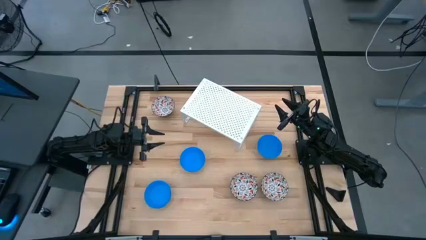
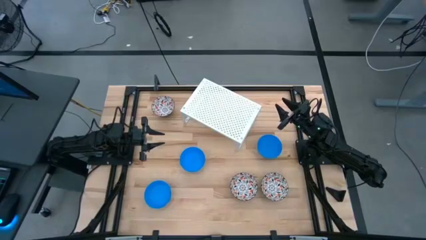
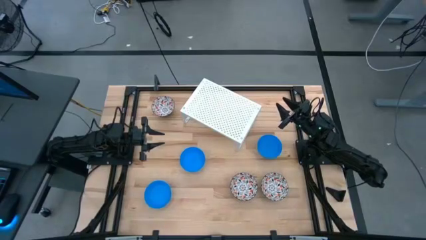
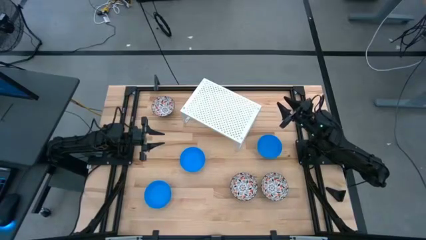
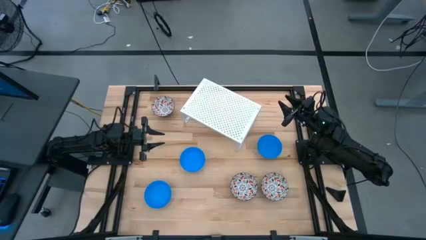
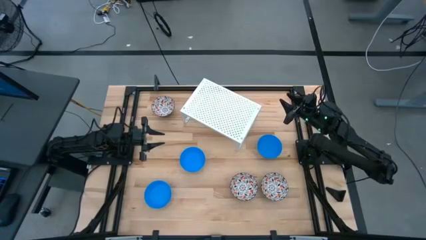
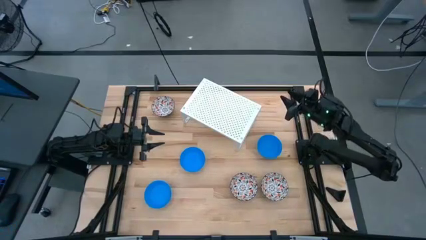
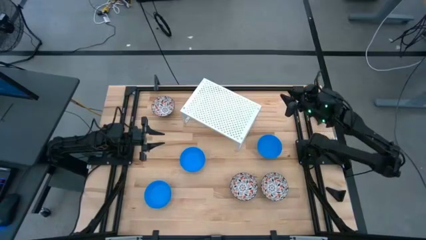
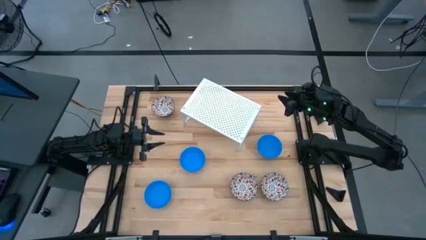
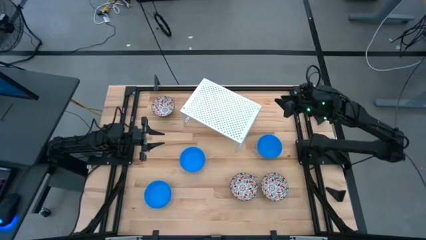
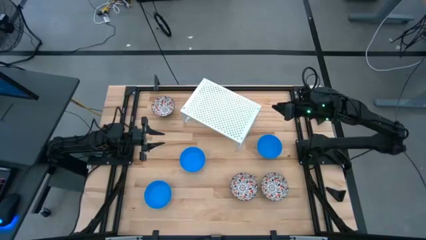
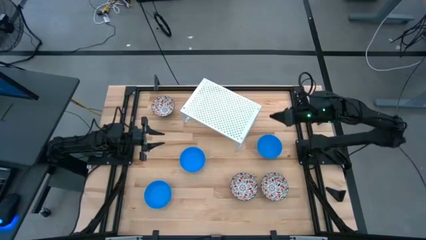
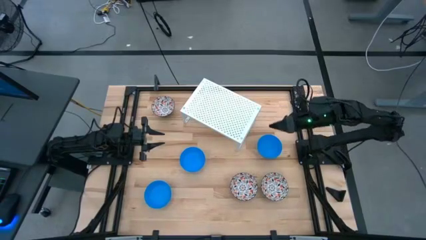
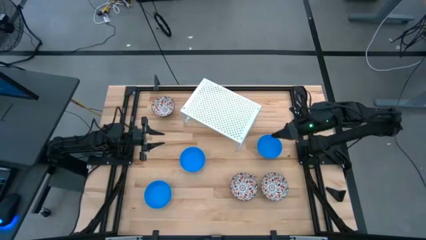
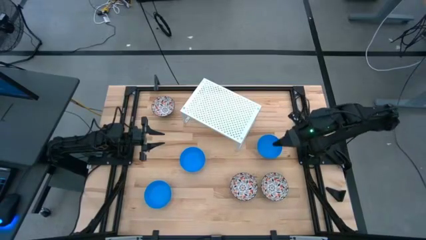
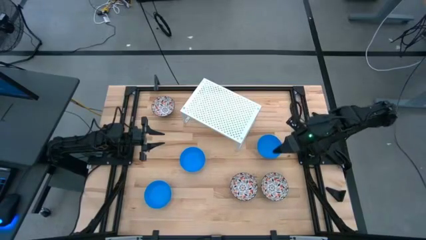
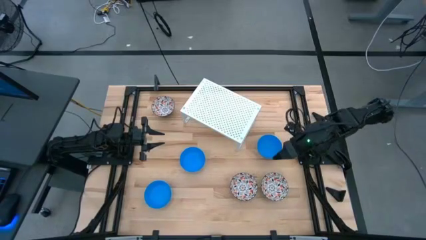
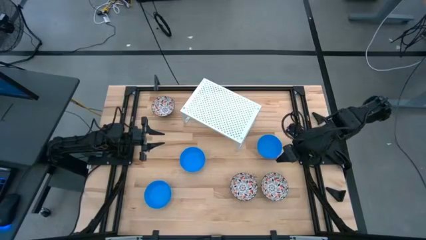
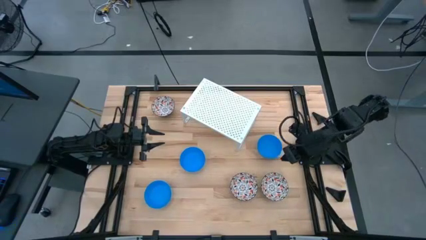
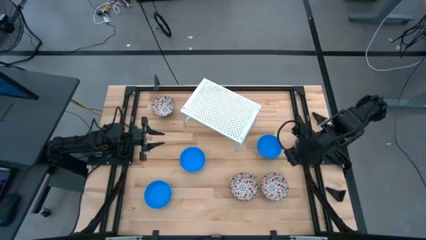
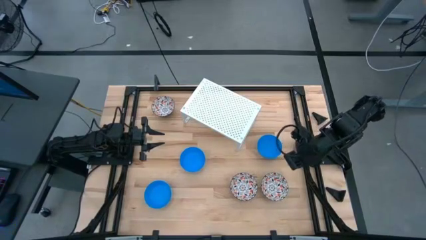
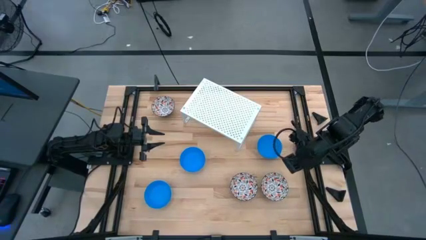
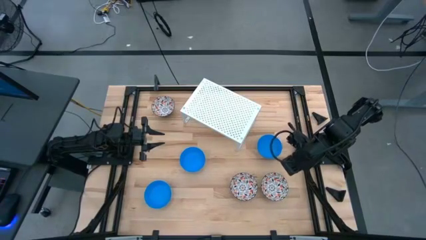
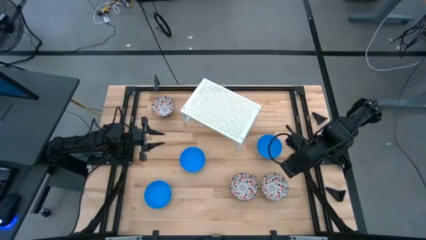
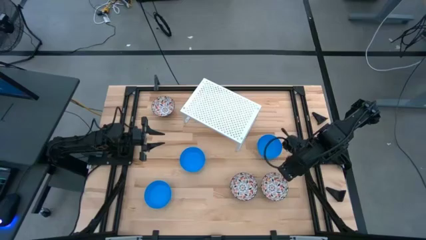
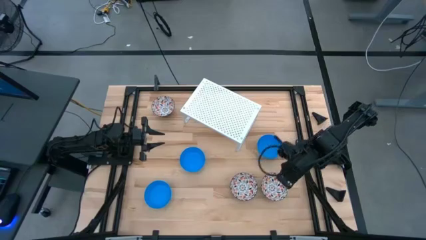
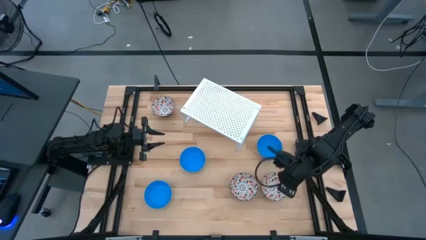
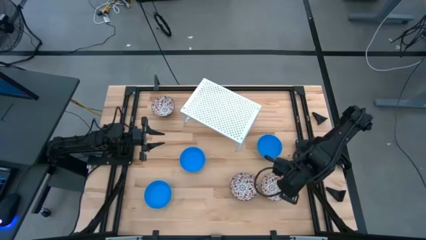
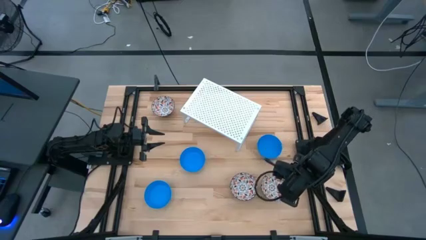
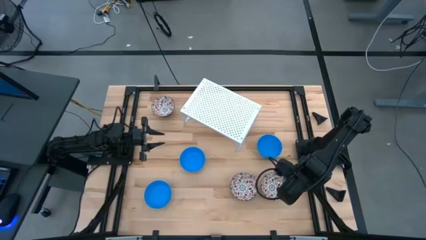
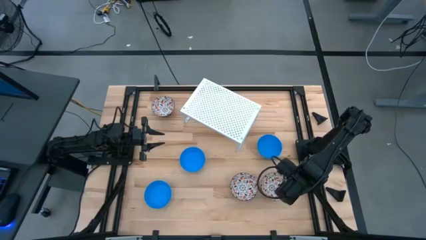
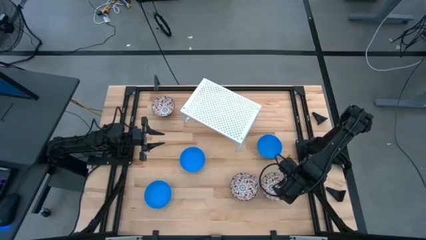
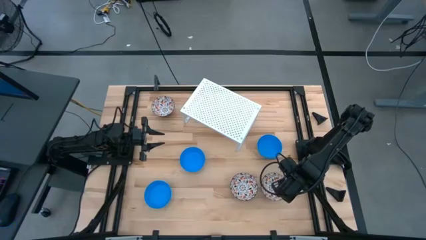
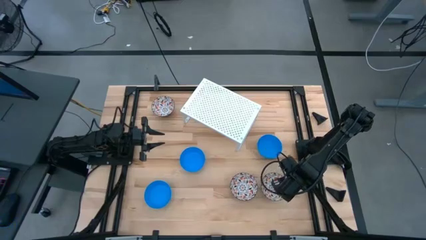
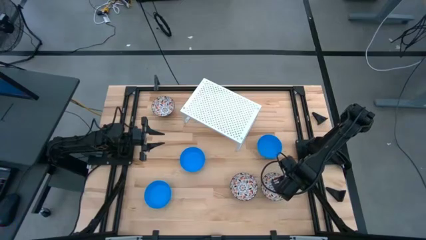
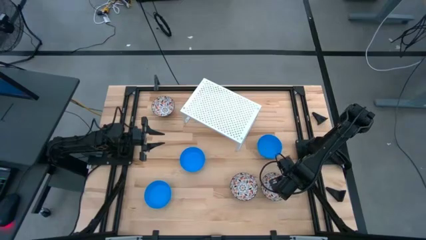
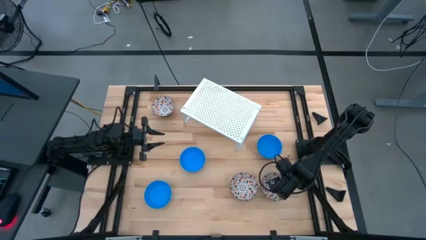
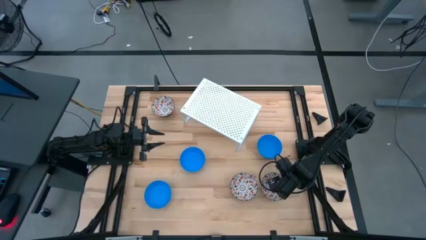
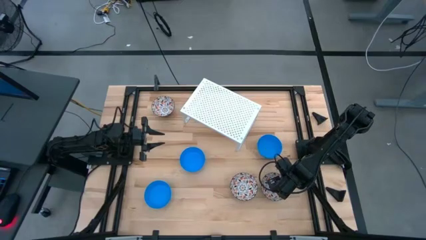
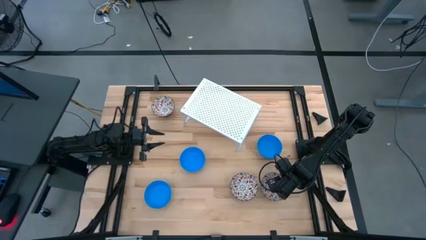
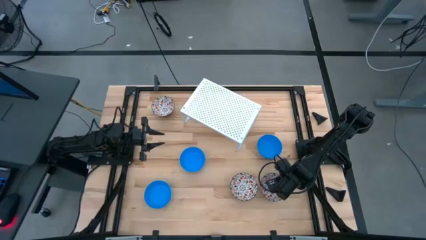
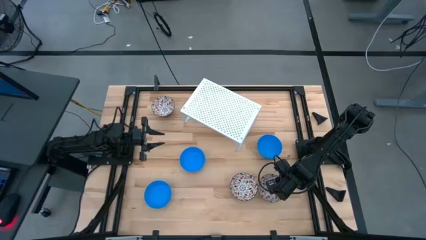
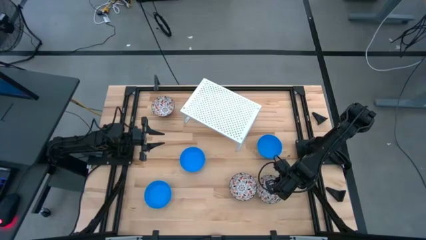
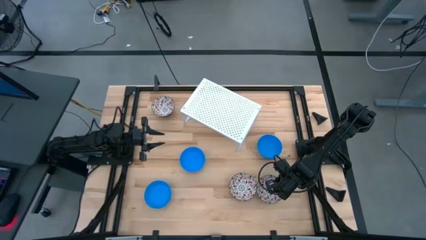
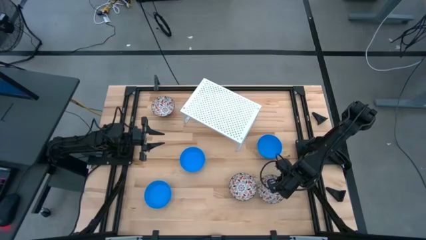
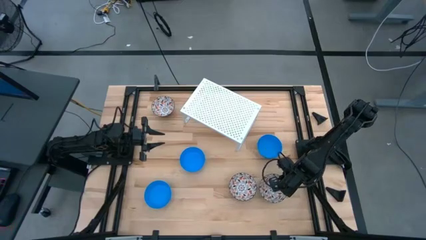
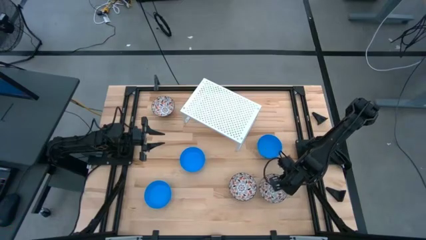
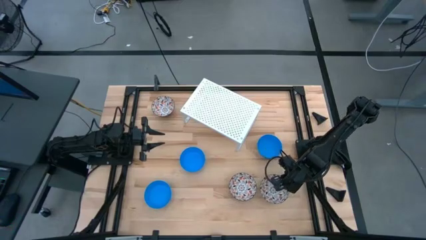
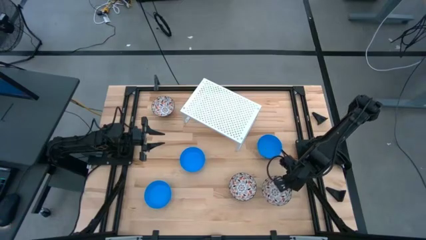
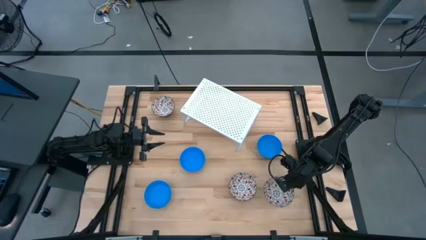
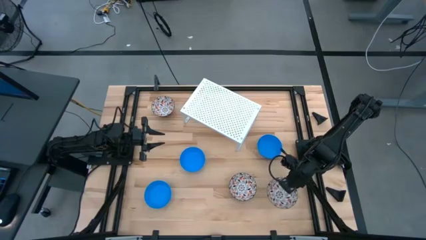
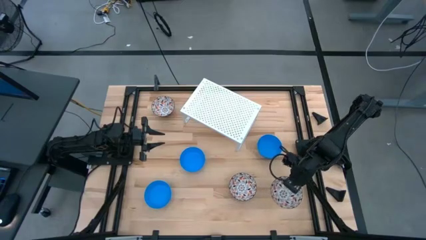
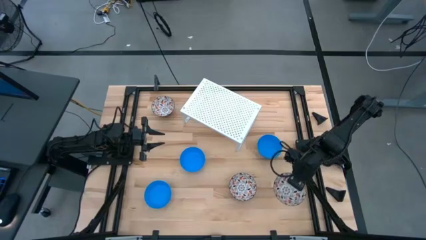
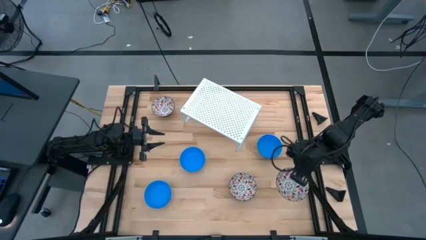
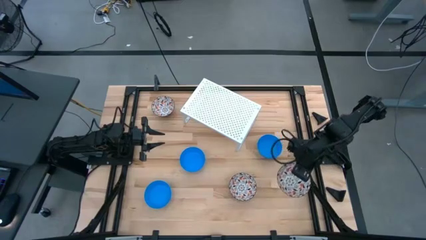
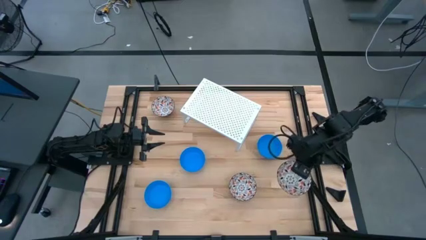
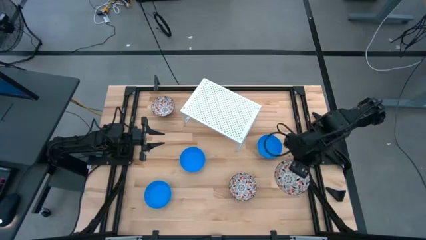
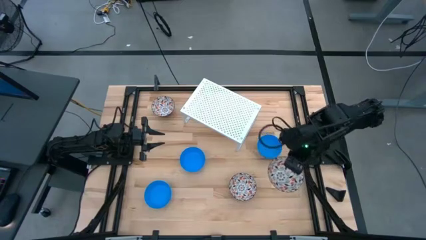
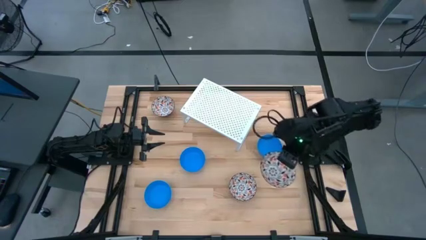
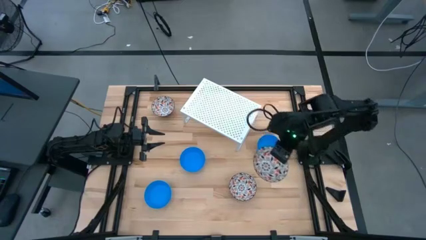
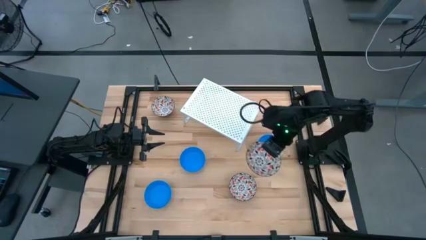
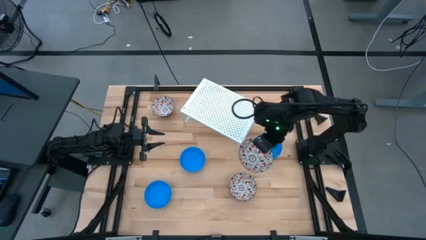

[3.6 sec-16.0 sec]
Task: Pick & Place Mini bowls
Put the bottom right white patterned bowl on the shelf

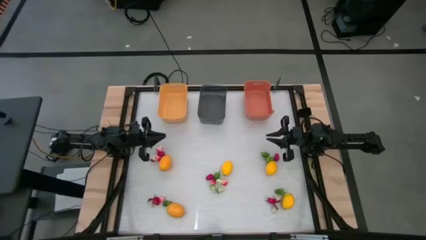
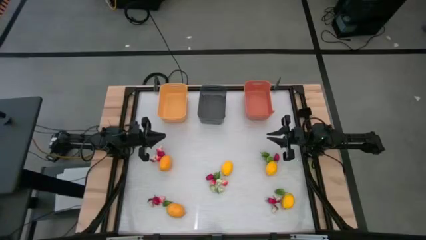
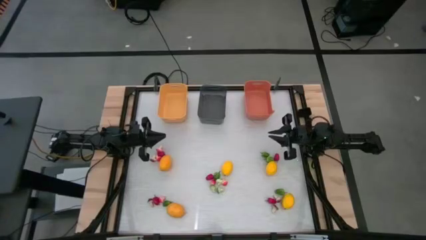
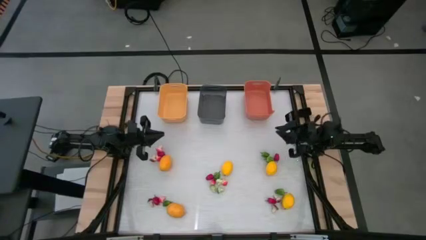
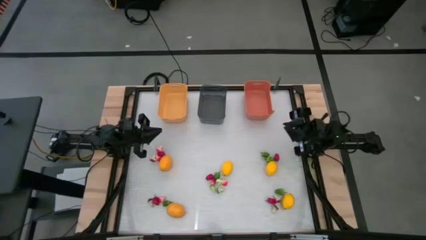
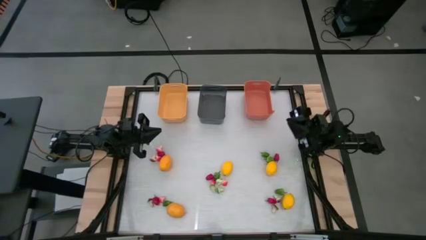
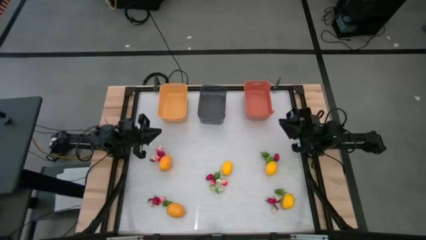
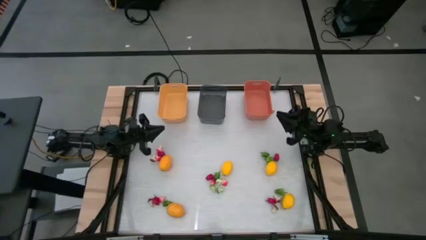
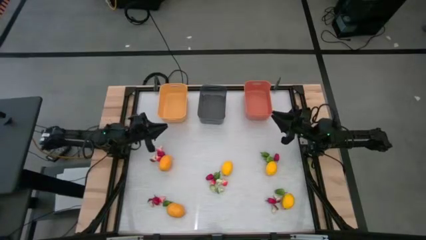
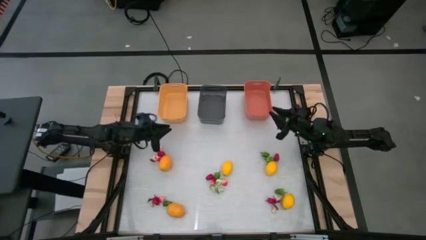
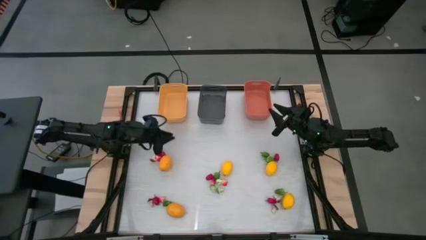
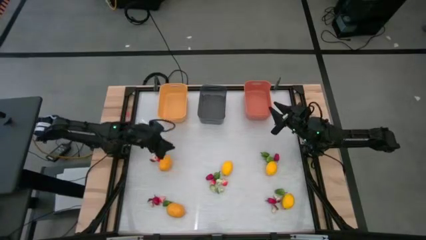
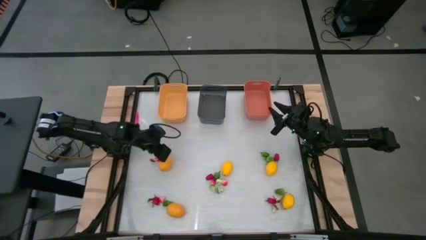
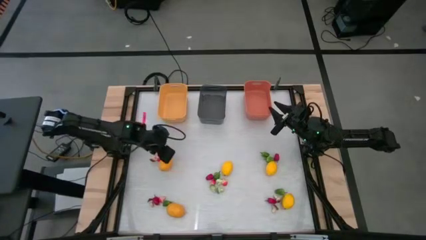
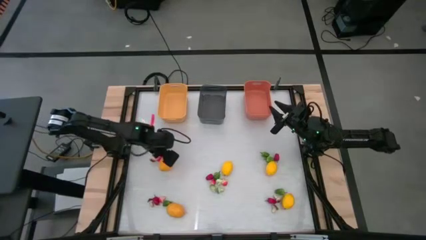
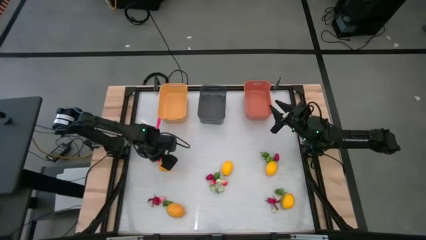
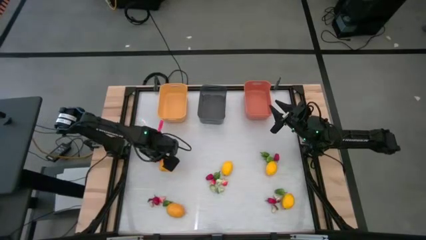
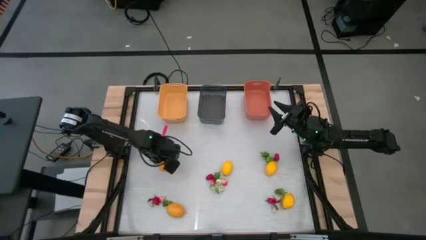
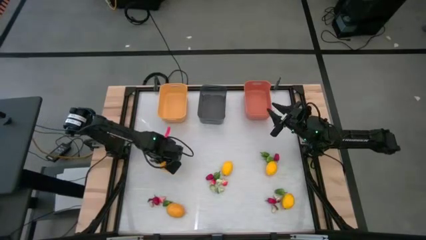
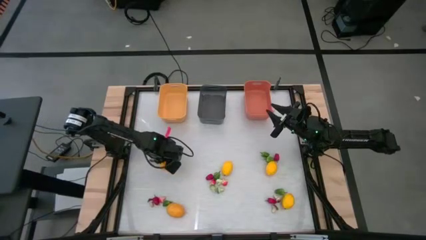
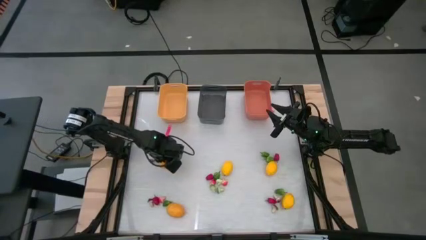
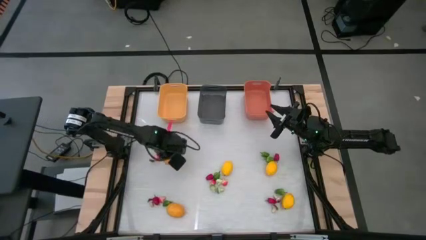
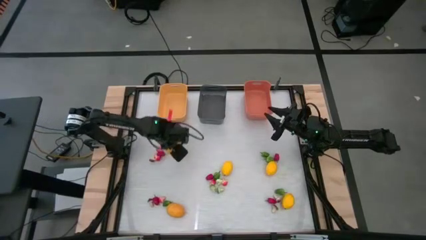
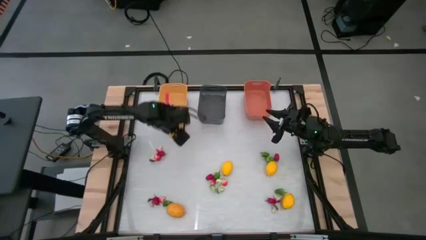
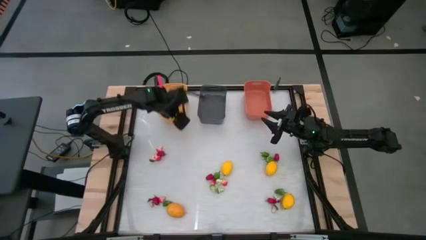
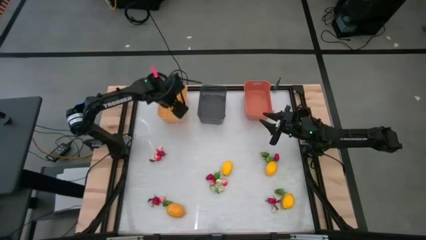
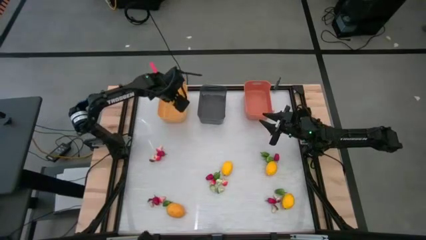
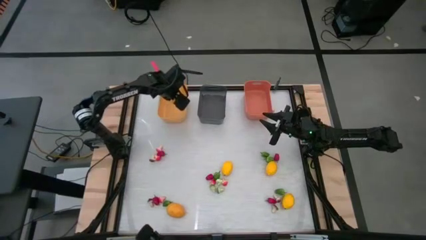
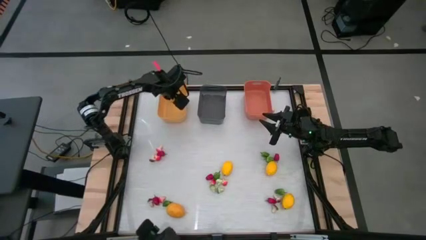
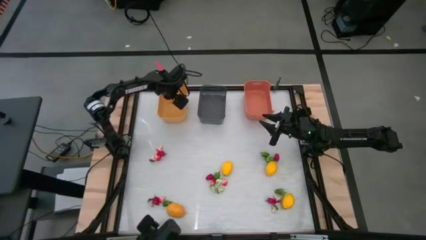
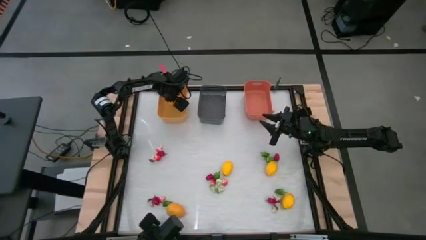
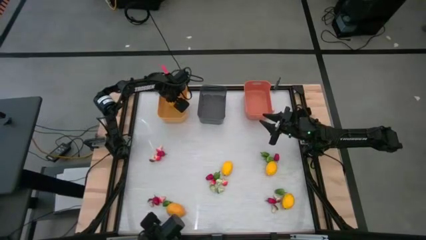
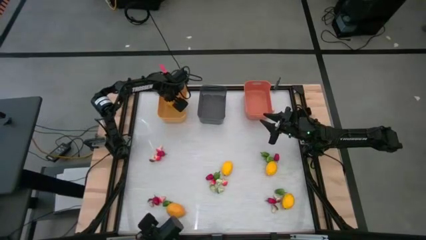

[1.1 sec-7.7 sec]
Task: Sort produce into baskets
Put the yellow lemon into the yellow bin
